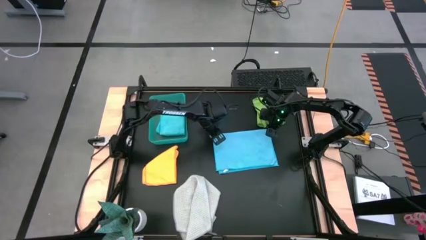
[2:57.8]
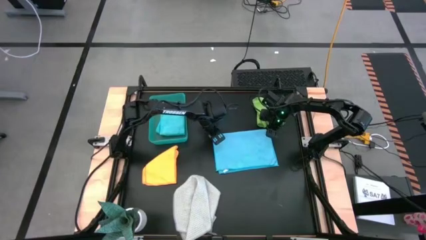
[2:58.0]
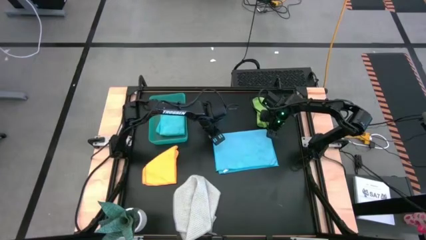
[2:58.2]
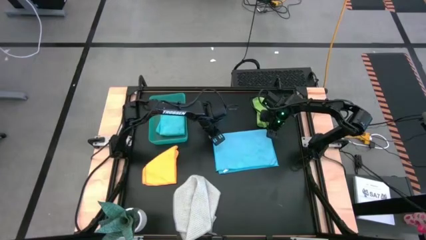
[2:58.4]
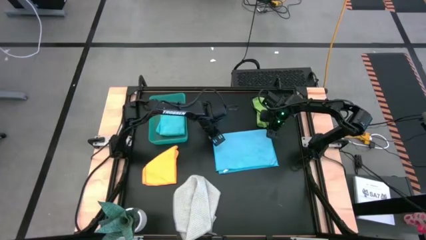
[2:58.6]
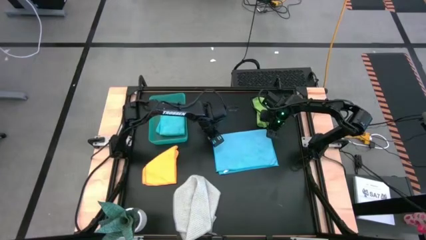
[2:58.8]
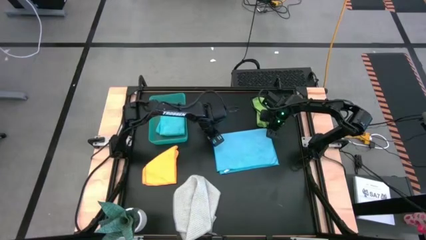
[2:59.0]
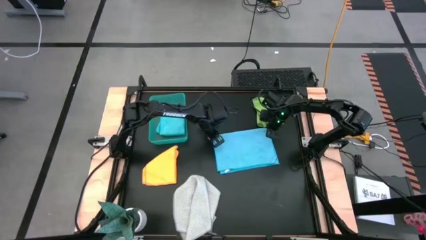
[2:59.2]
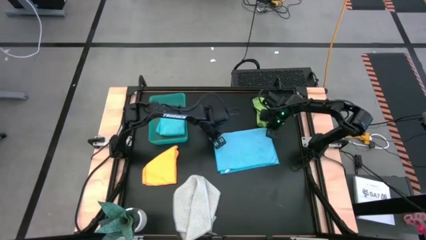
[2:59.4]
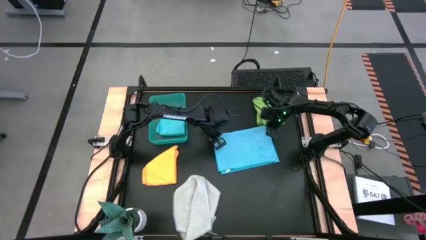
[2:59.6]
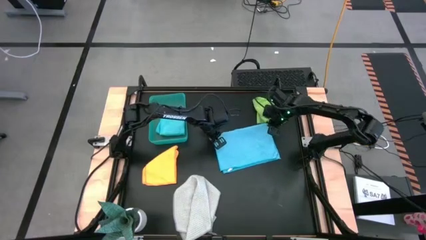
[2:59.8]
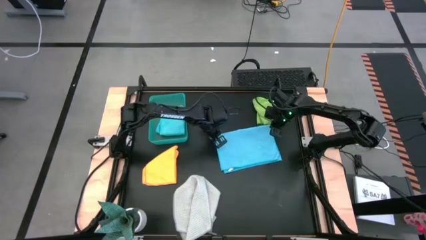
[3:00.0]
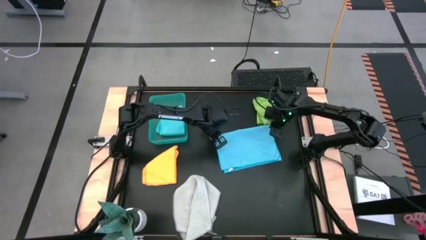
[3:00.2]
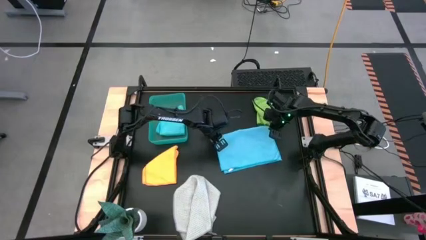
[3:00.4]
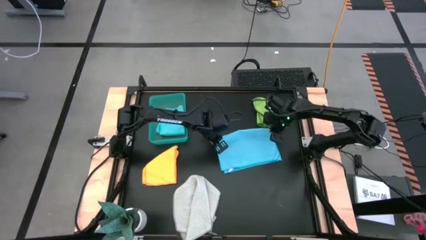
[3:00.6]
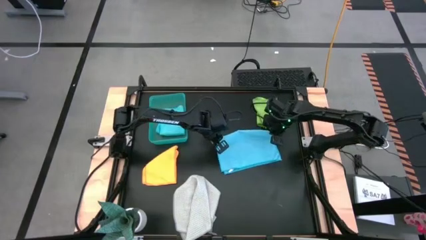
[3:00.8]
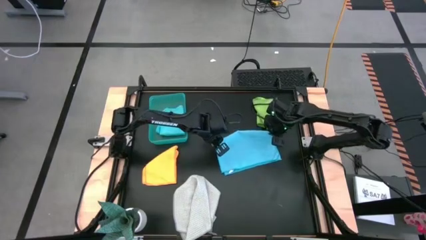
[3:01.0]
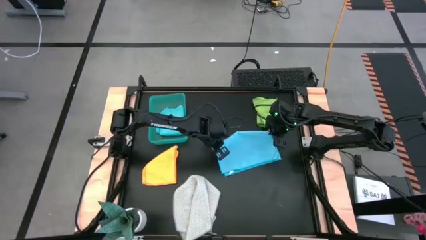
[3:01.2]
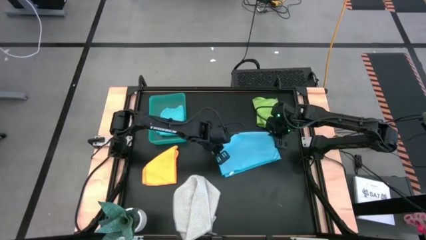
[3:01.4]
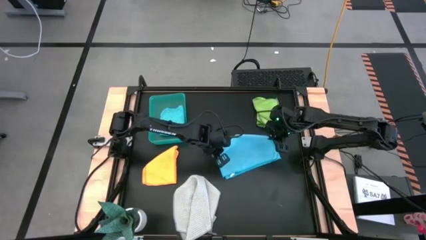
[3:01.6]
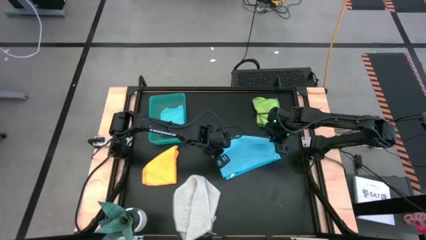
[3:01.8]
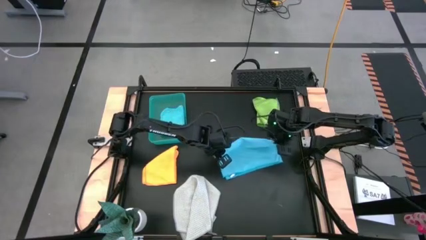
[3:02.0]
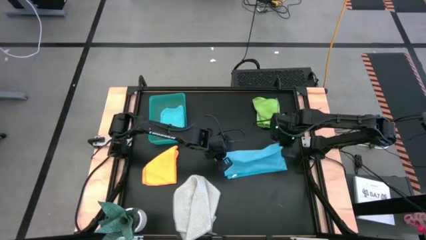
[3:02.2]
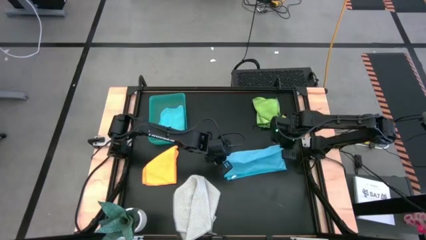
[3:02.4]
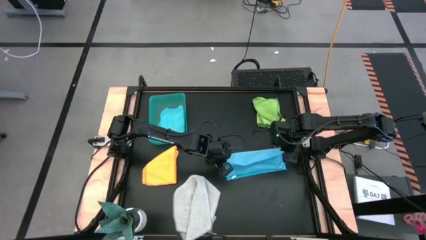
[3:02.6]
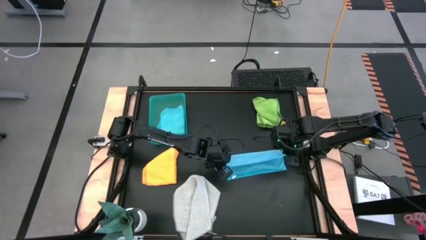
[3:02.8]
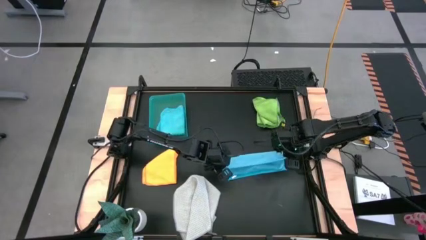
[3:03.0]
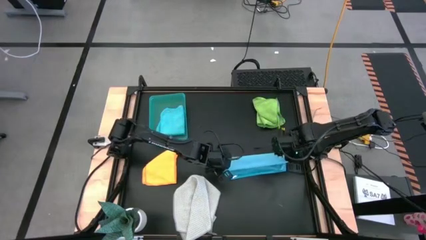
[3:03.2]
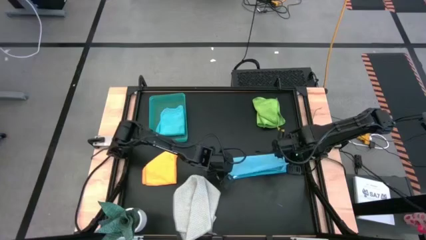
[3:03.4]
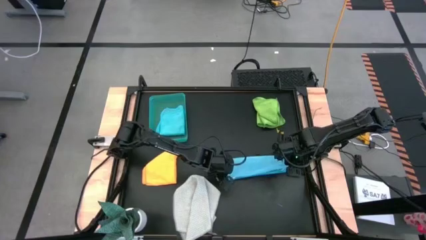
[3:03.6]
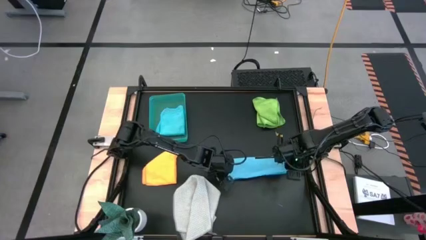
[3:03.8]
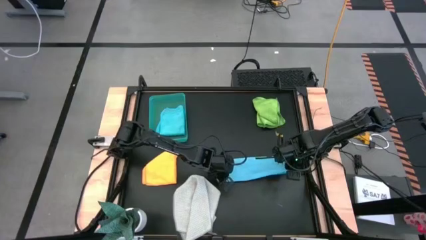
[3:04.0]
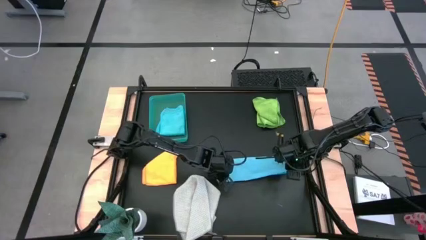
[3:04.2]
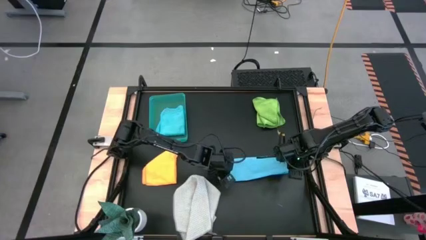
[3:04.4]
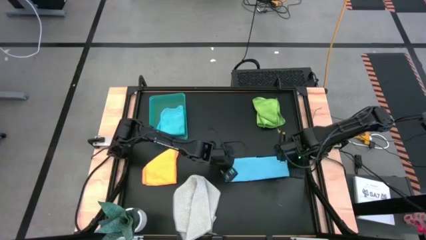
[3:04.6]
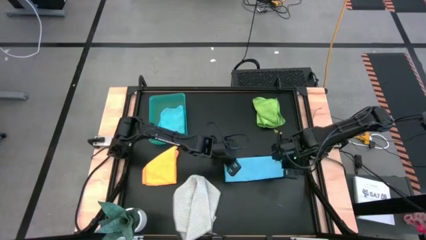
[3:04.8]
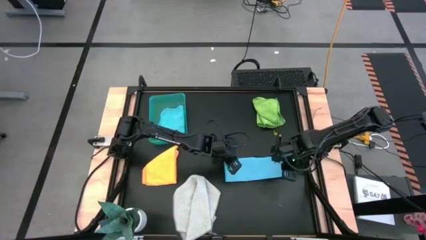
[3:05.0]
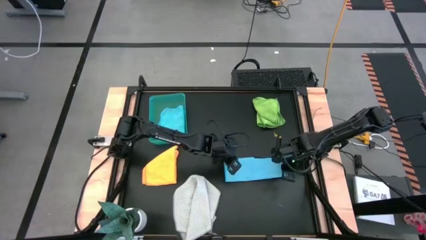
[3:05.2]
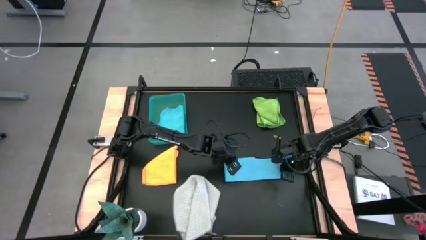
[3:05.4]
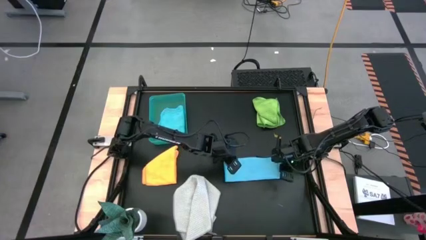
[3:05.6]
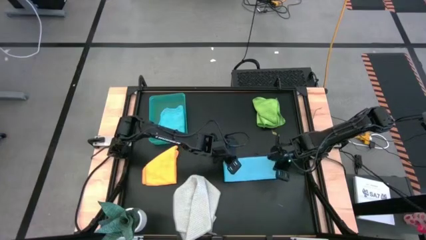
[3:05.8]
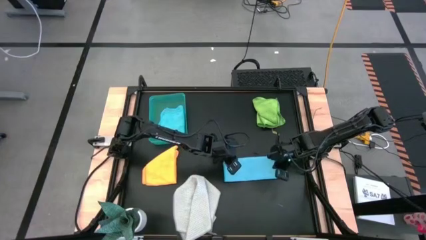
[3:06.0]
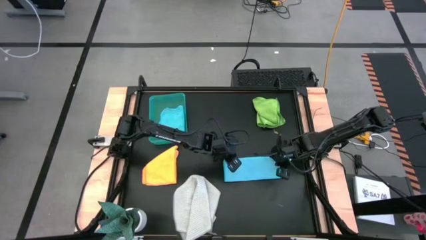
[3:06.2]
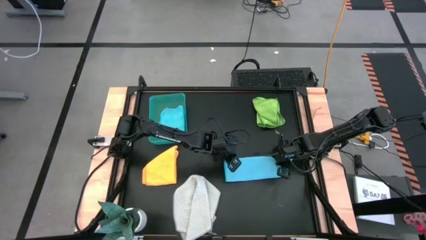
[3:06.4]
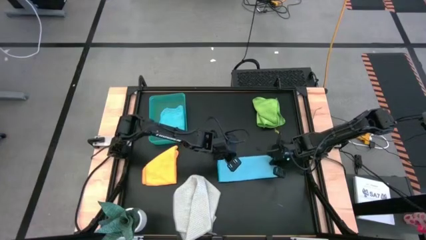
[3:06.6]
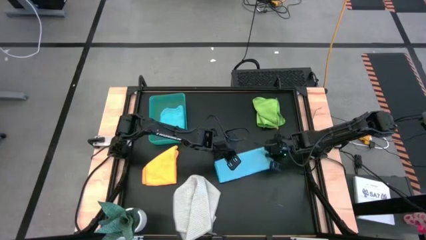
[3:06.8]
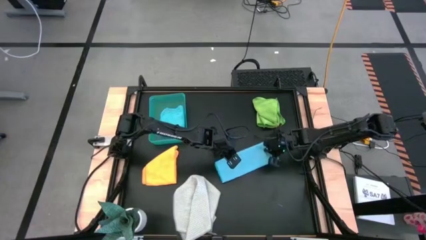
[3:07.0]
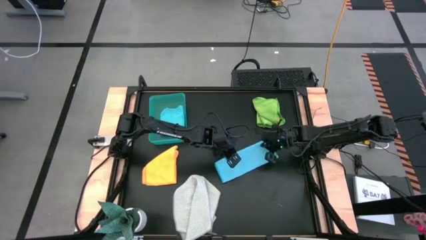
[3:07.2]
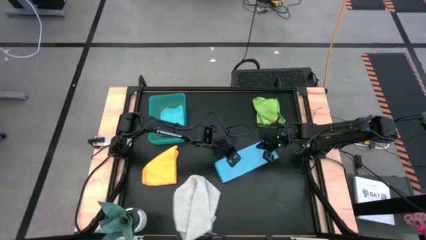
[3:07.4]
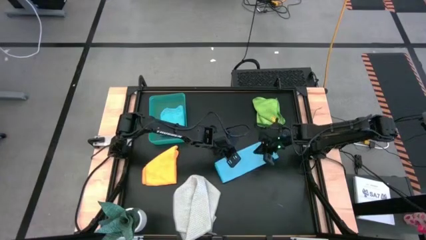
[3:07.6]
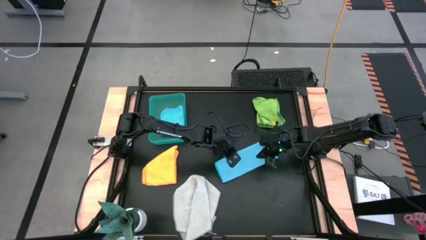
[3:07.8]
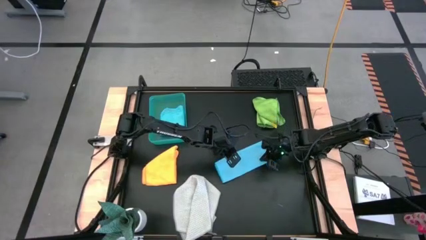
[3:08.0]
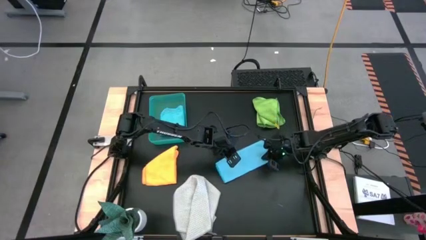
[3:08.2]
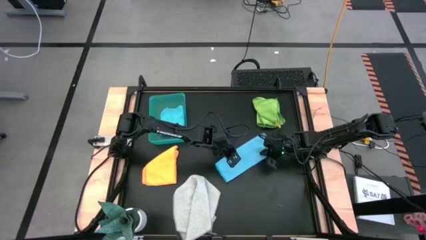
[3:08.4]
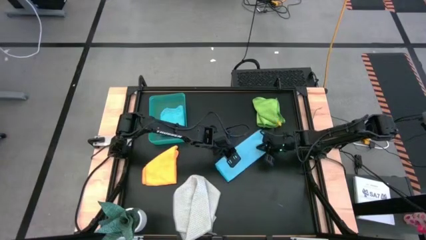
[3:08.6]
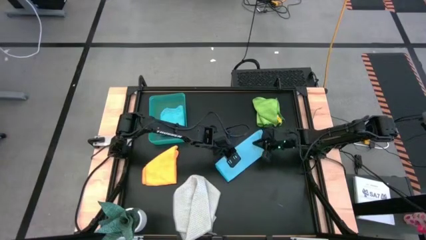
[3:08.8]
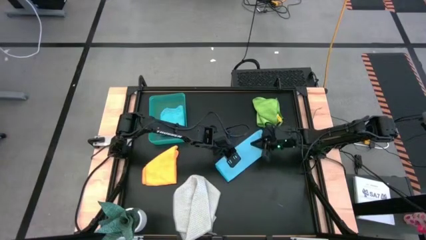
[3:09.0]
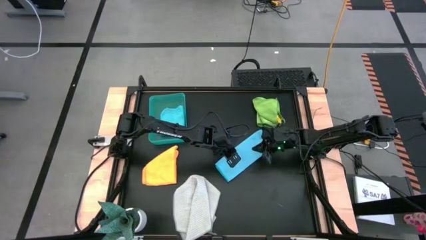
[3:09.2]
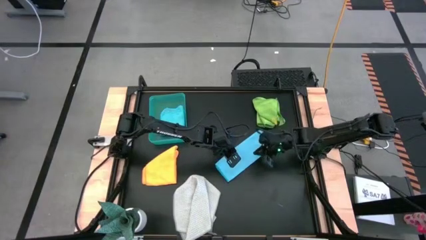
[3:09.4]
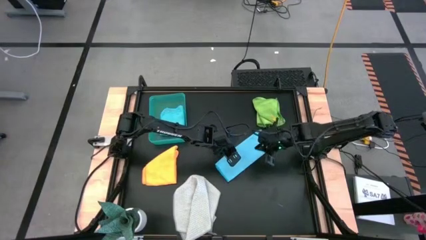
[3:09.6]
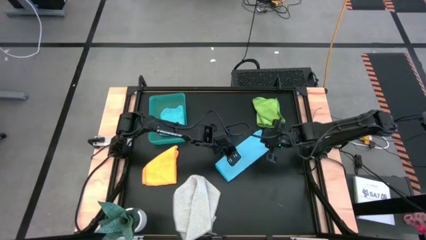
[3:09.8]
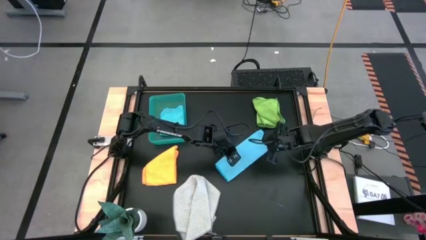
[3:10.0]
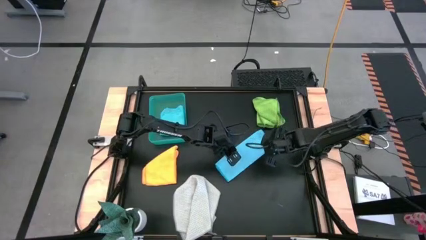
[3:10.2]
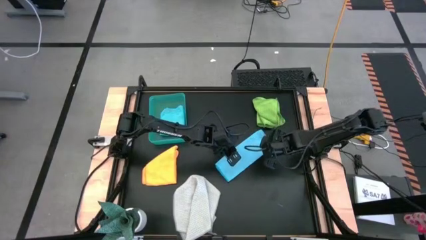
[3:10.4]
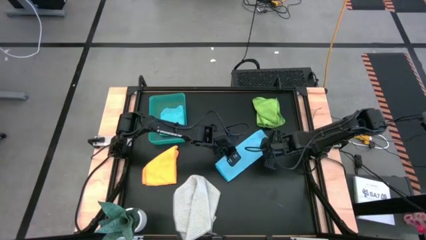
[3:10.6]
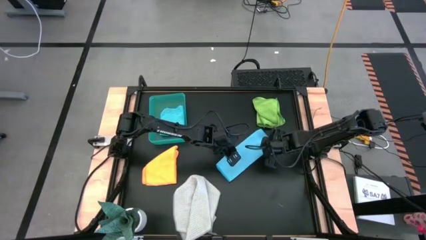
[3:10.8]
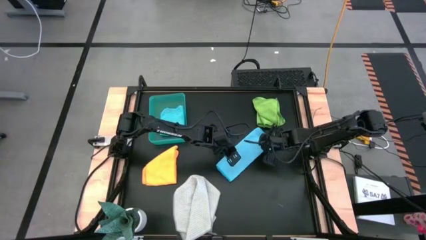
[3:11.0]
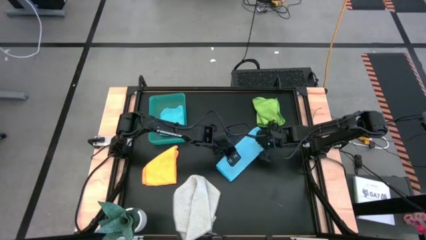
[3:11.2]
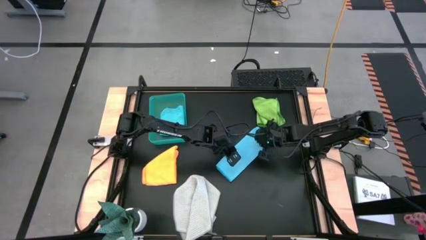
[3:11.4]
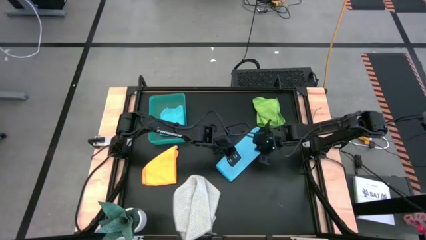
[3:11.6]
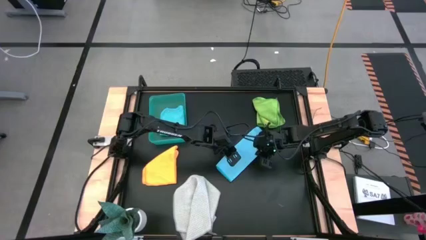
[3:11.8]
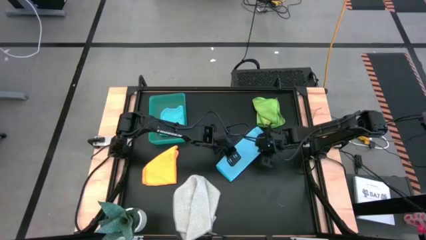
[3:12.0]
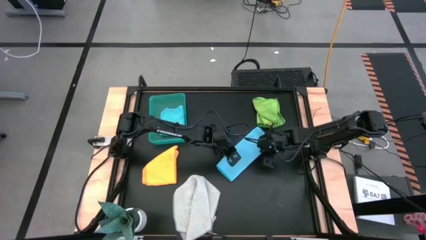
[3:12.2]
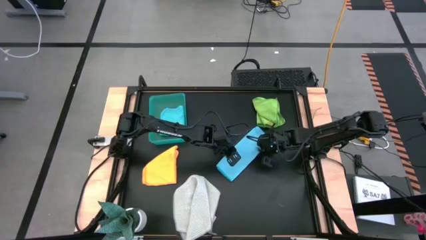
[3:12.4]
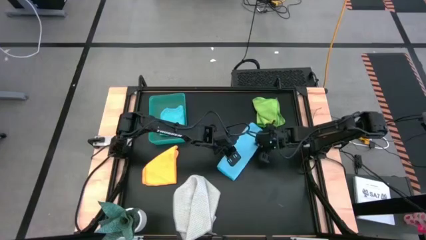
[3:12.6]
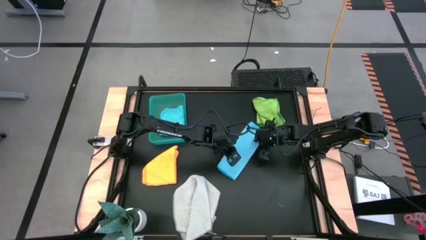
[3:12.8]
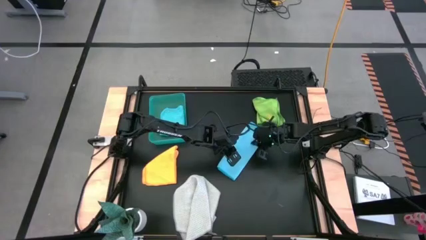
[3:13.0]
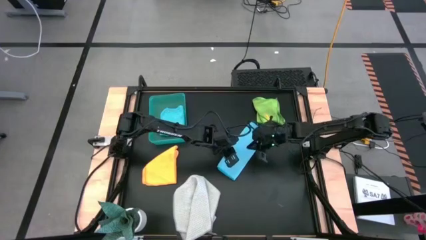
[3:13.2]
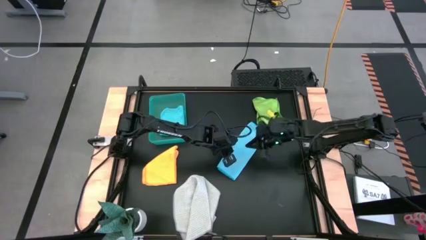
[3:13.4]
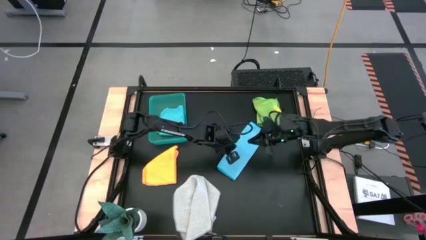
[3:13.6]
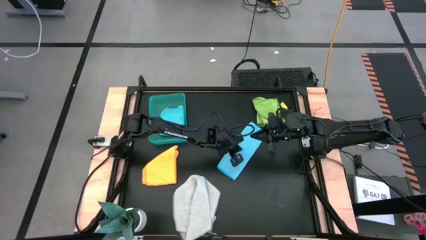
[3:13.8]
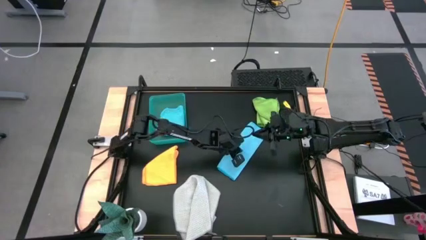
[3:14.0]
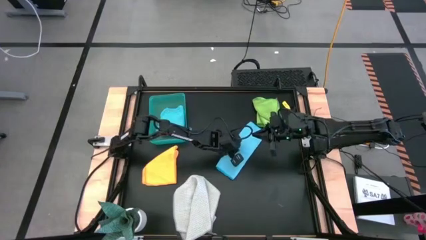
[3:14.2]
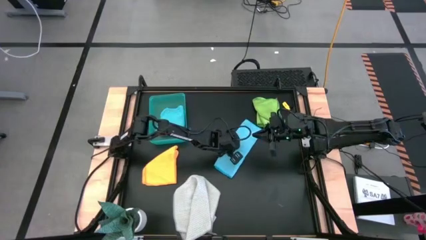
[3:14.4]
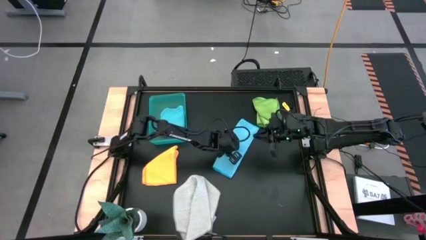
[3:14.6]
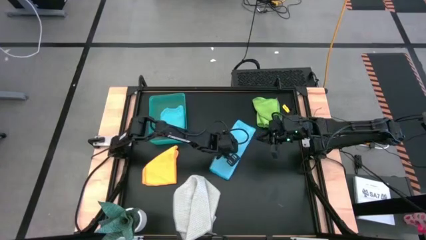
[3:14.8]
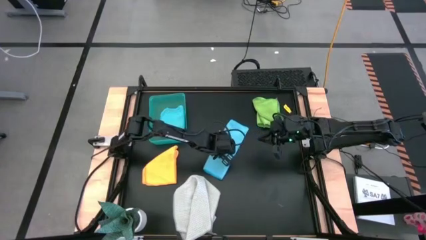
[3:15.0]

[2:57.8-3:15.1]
Task: Fold microfiber towels
Fold the blue microfiber towel
